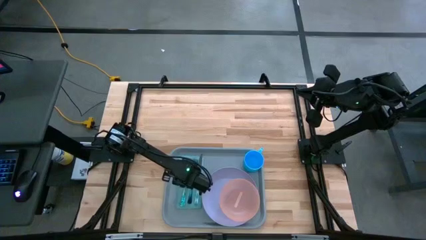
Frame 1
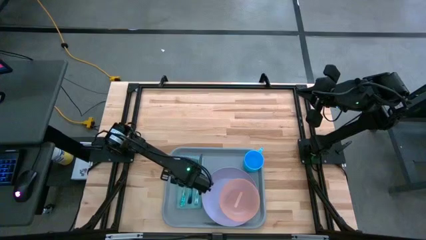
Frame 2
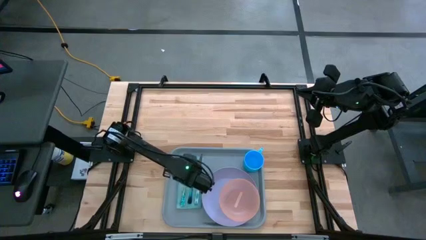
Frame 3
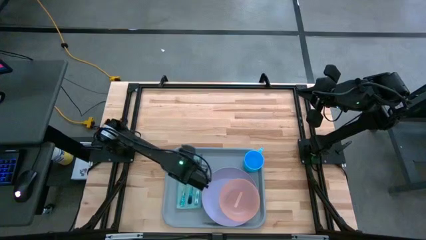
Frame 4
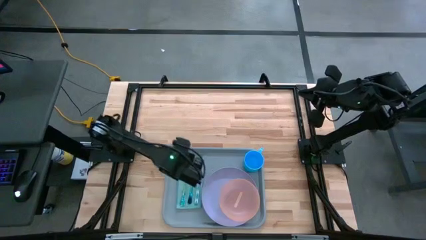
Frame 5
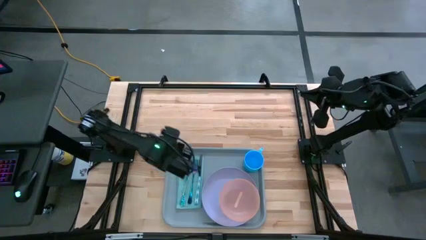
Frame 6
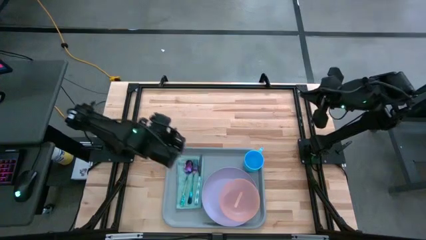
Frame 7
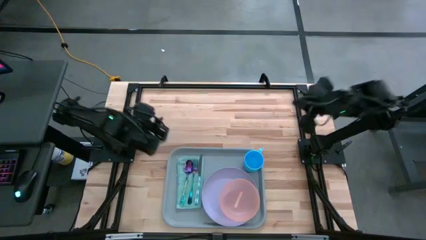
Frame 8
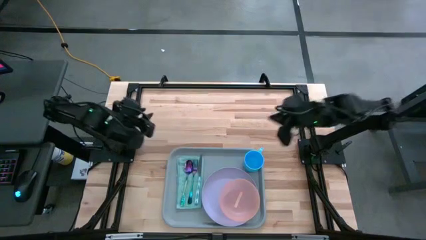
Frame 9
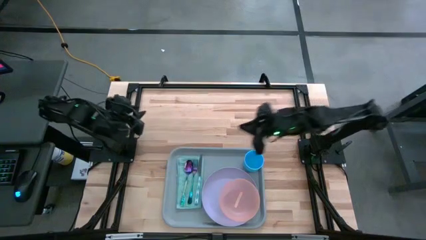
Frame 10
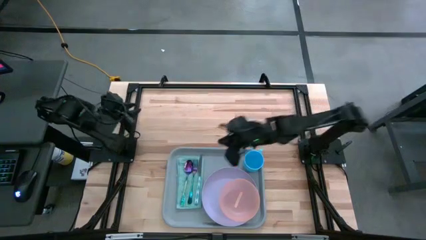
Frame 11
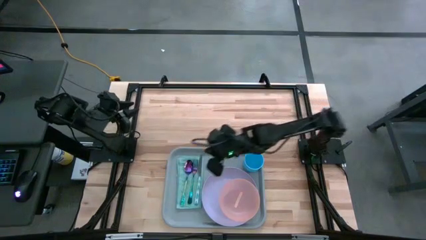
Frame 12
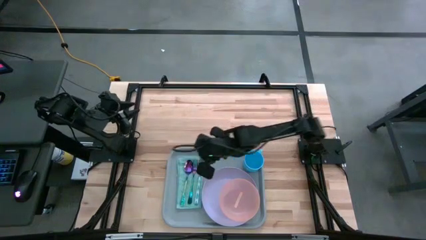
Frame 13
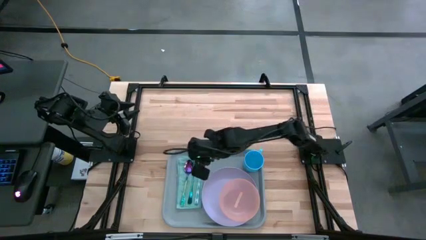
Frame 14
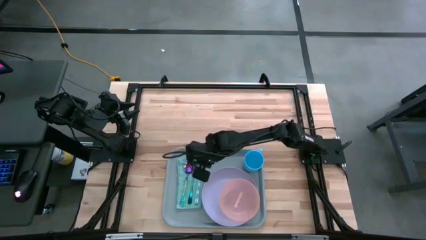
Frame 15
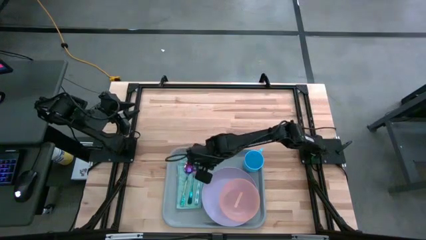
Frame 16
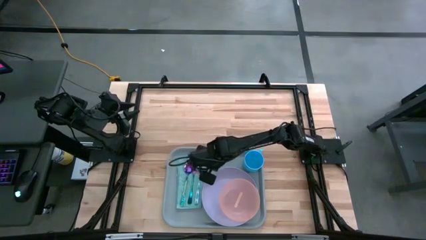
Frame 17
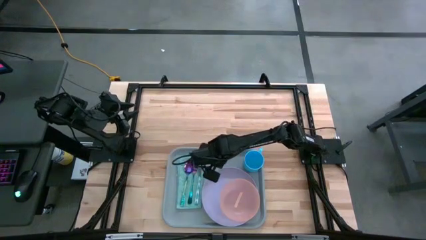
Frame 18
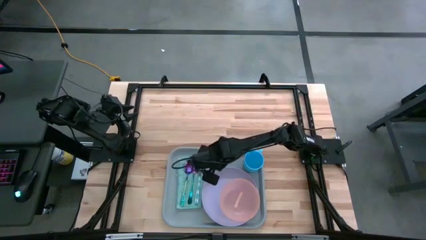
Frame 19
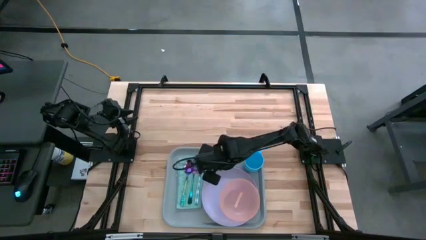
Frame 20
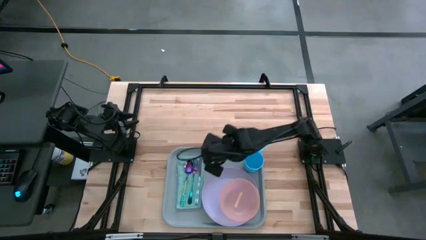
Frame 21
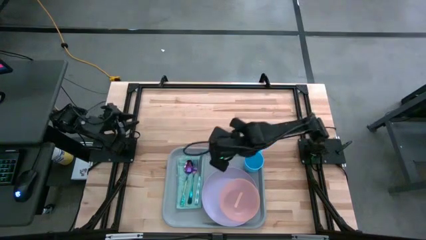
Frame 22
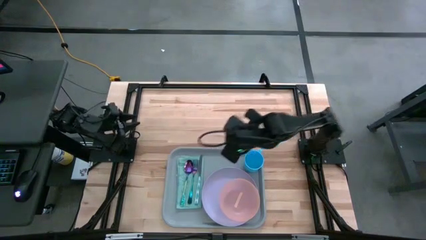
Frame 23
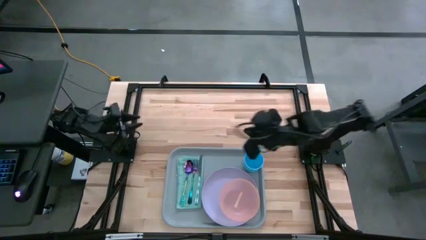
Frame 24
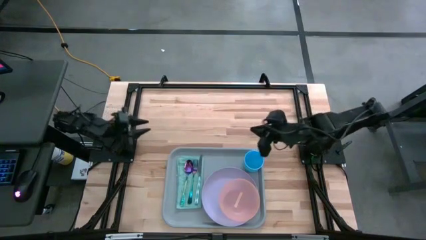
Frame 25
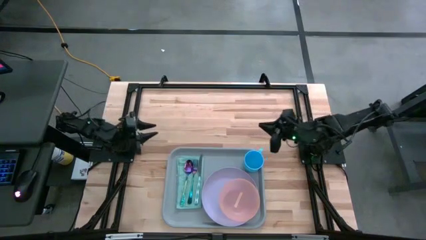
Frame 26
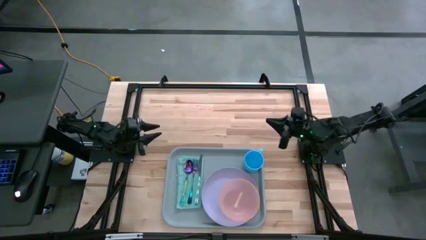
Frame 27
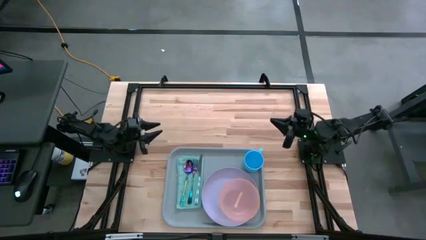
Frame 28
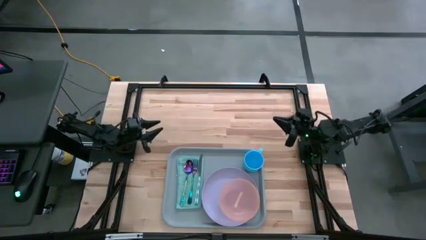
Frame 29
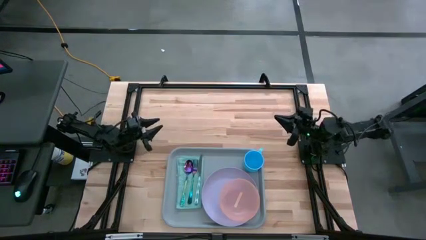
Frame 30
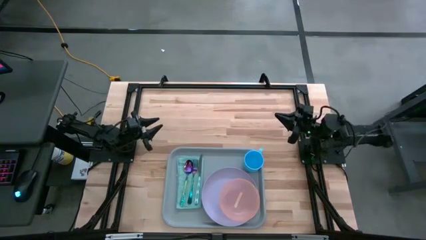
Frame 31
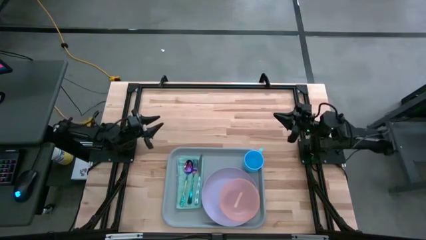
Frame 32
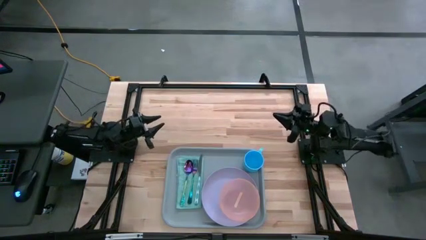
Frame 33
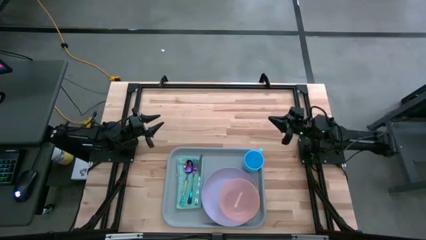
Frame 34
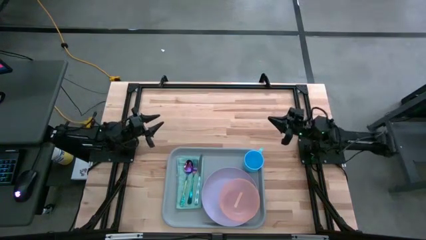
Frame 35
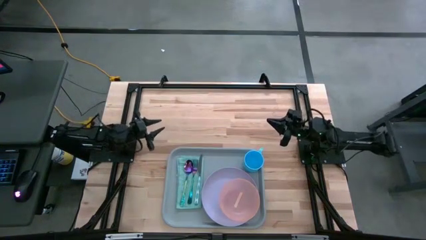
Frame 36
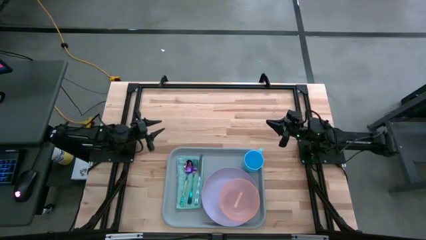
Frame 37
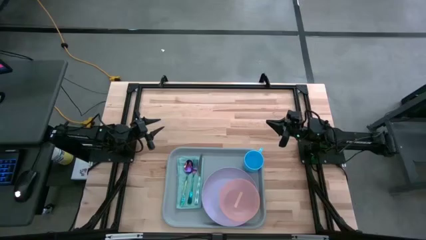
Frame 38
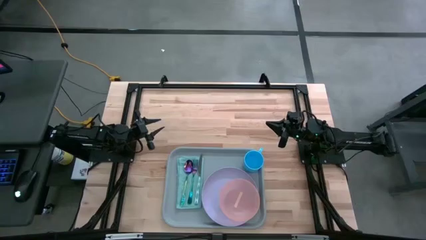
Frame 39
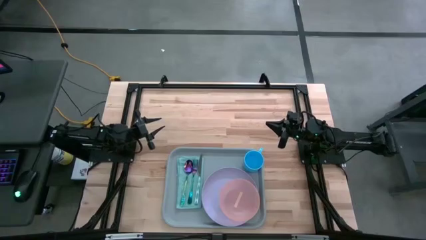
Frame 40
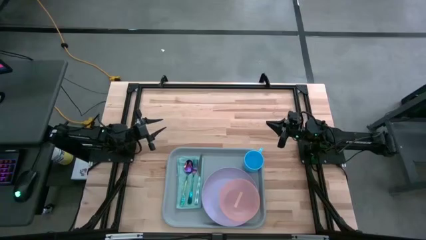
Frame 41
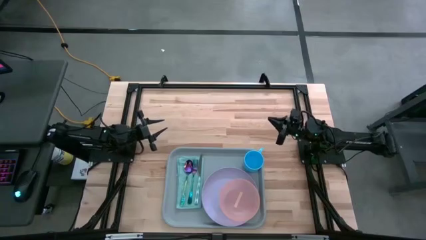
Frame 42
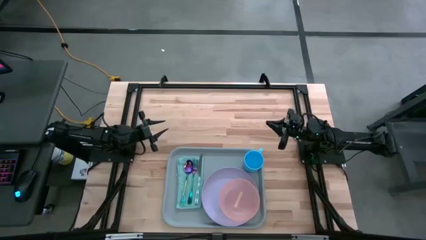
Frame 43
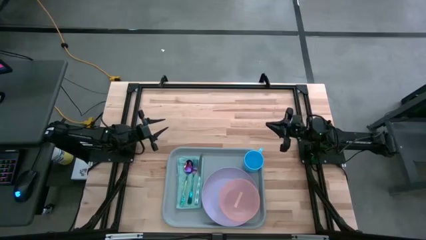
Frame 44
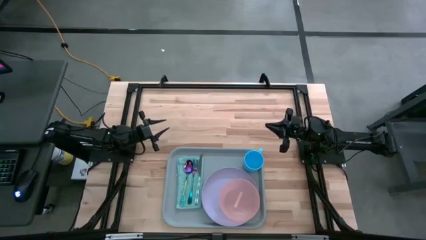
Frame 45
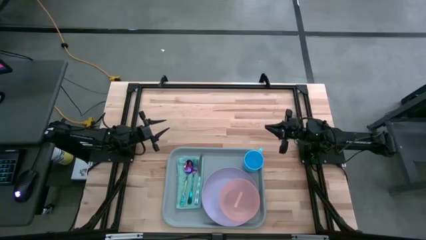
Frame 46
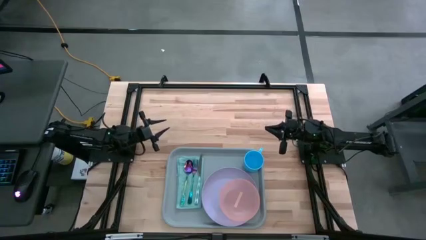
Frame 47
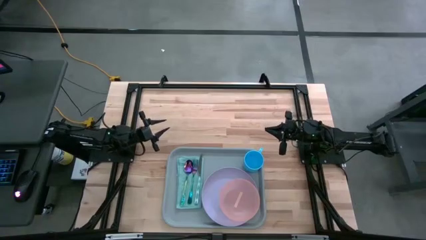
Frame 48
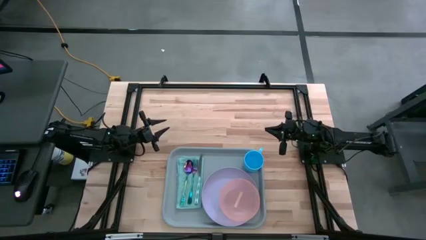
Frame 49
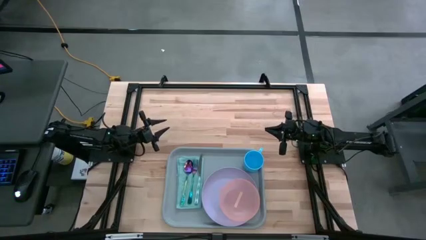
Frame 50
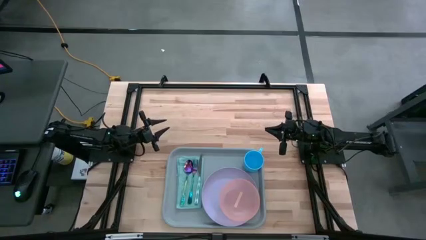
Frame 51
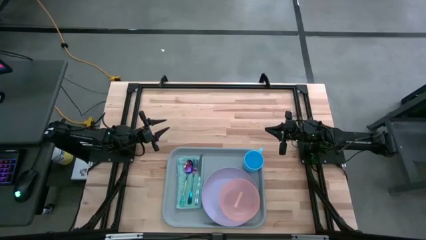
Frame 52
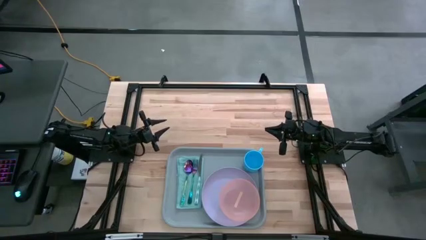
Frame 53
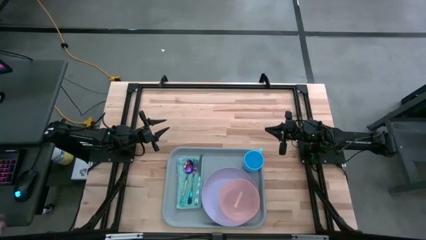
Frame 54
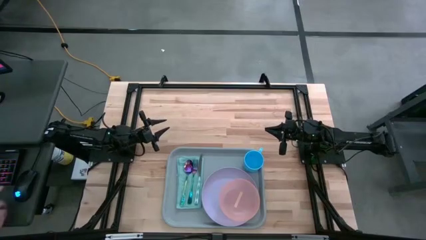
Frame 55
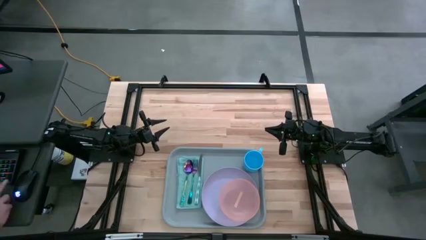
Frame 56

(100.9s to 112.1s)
Task: Set up tray
Return to Home Position

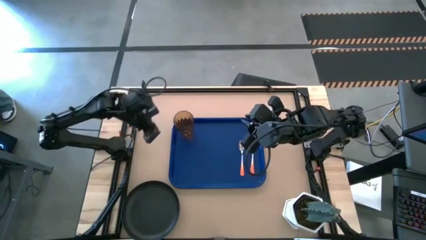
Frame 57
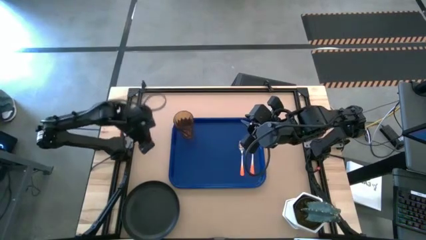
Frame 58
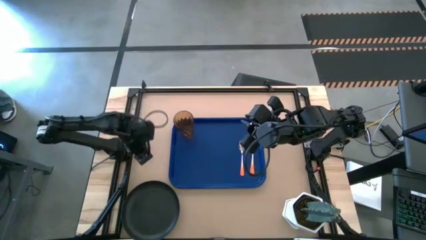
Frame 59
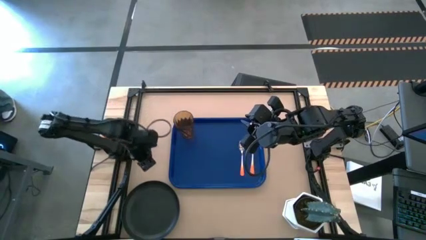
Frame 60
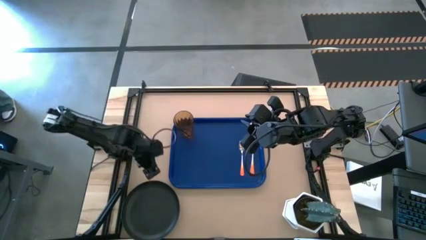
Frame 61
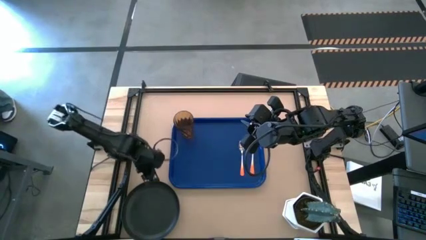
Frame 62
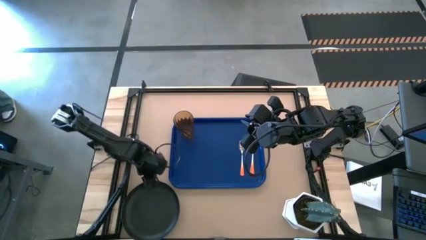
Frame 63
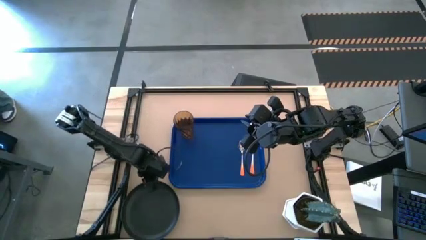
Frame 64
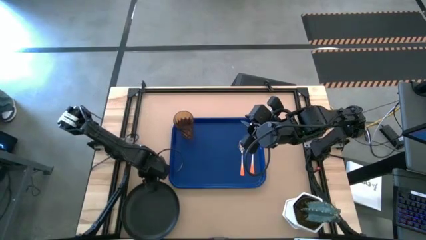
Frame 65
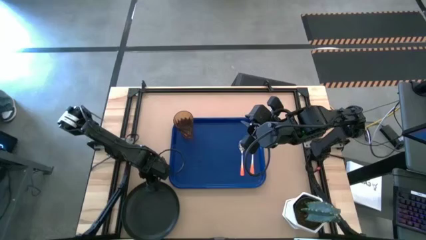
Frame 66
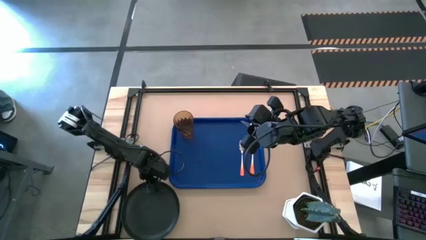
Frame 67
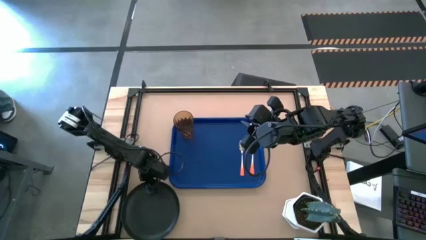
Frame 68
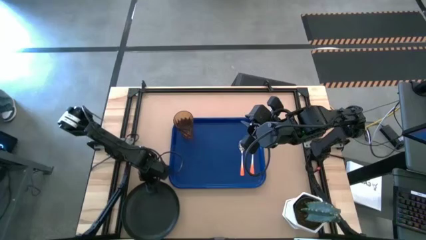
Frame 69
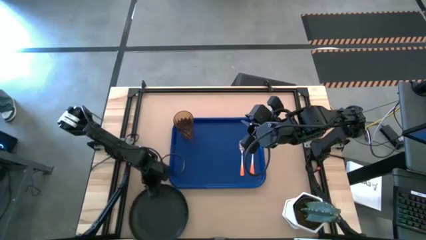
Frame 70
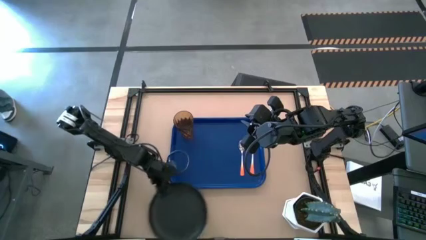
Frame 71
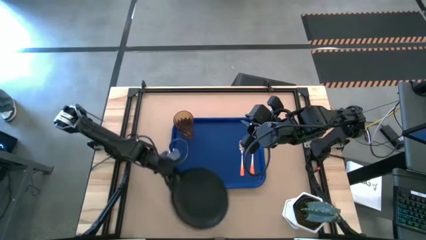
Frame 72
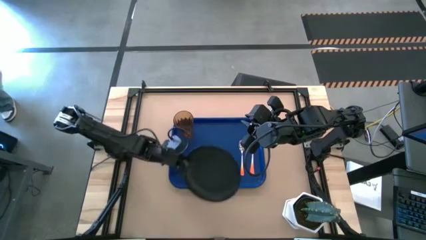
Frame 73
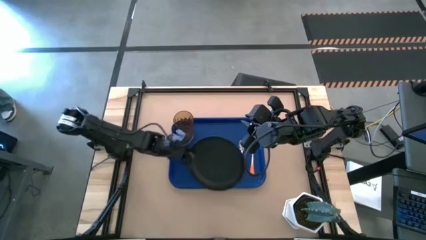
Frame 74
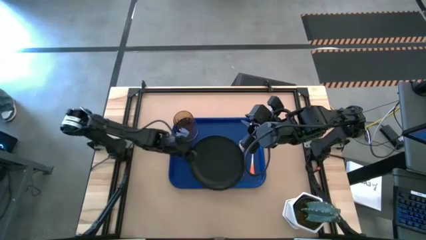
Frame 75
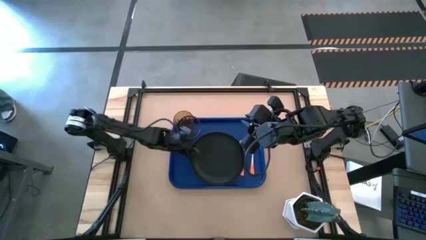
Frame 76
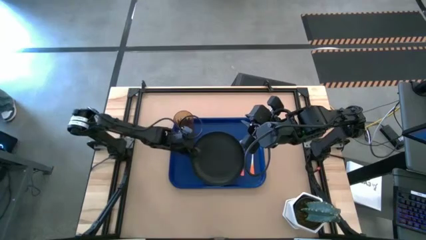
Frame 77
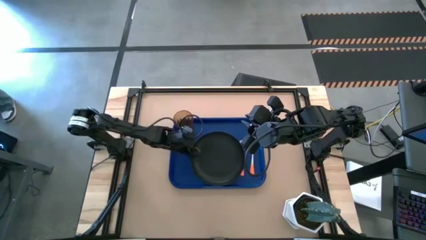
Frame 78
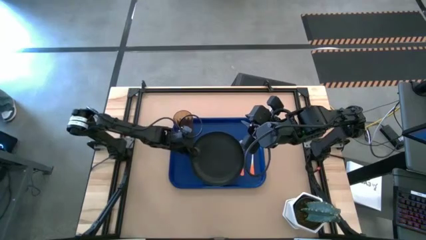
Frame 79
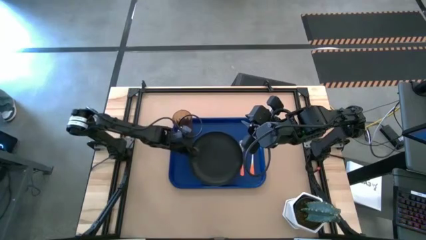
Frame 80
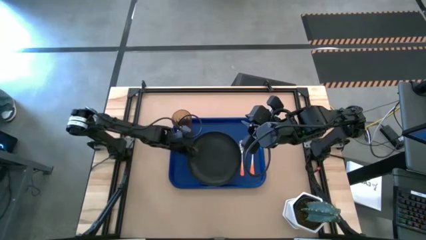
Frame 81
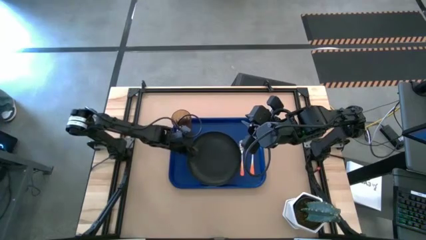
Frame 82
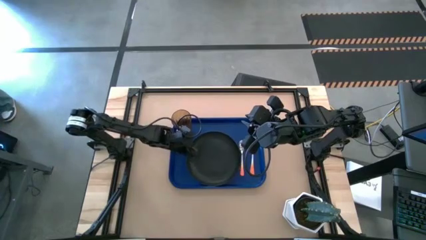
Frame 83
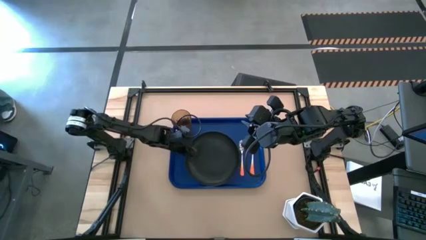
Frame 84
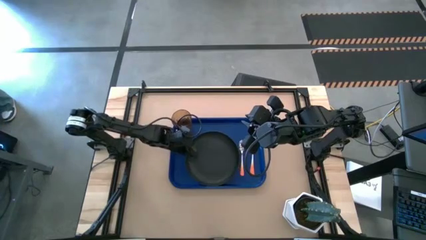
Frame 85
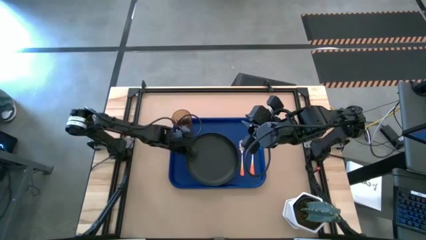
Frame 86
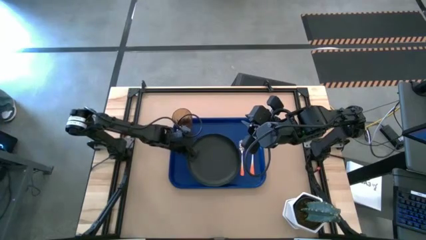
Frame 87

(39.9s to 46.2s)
Task: Pick and place plate/cup/fork/spoon on tray
Put the black plate on the blue tray
